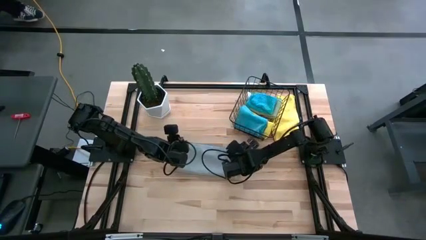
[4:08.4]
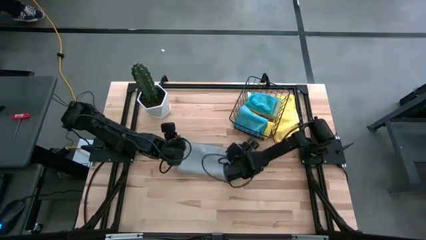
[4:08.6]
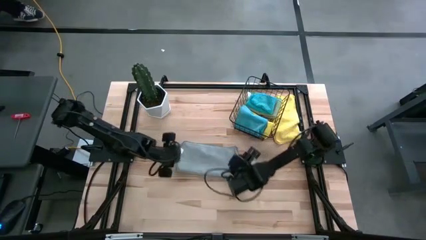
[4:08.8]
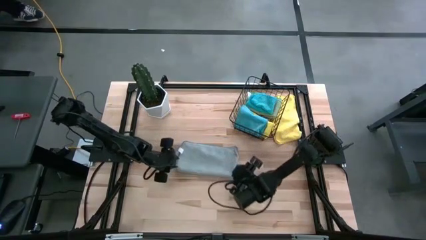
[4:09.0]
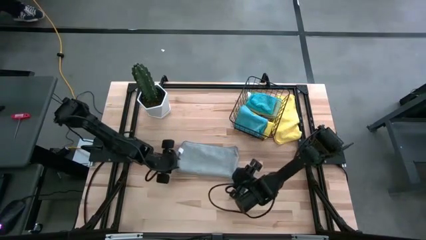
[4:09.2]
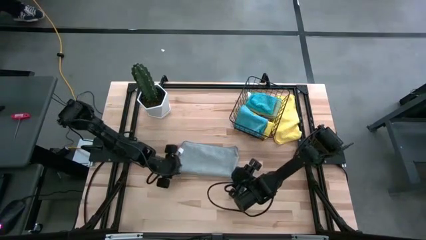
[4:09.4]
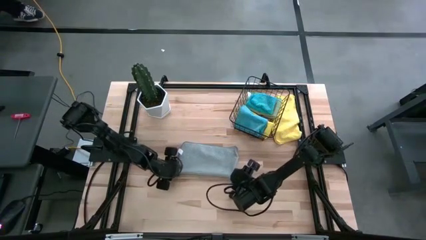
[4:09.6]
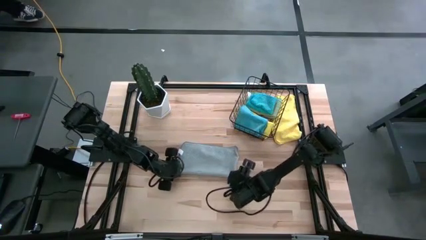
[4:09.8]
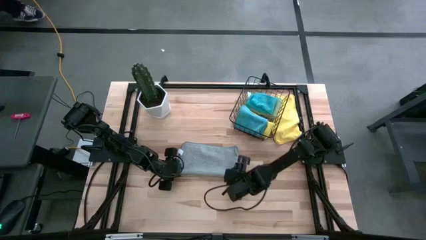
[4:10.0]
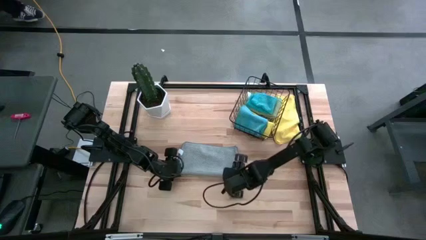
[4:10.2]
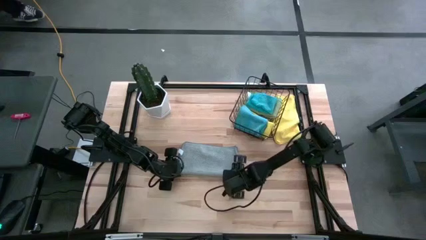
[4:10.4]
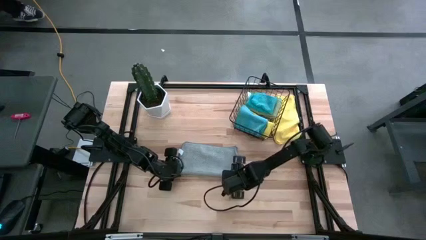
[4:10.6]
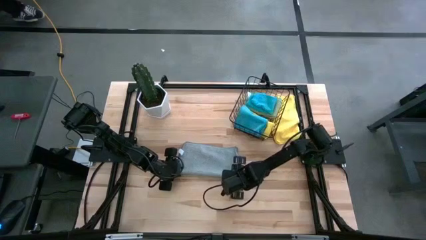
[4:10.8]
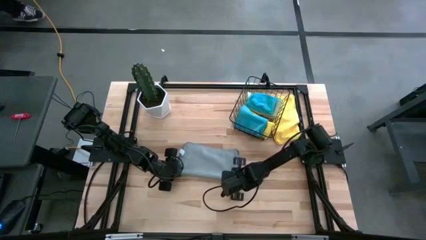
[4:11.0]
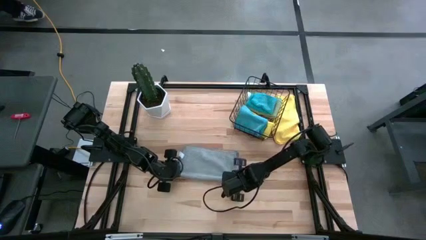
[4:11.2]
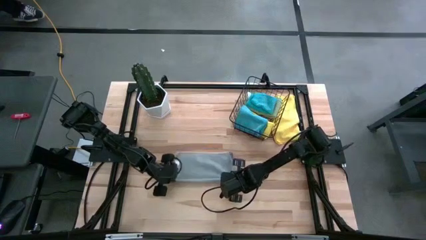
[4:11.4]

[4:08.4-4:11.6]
Task: Fold microfiber towels
Fold the gray microfiber towel

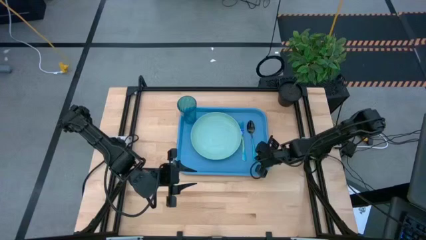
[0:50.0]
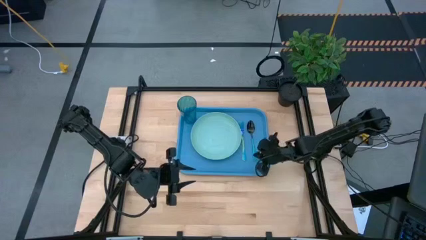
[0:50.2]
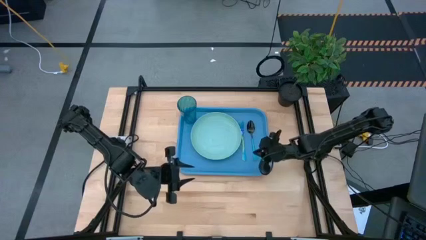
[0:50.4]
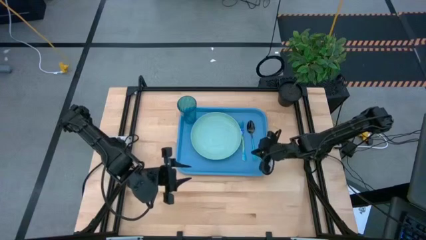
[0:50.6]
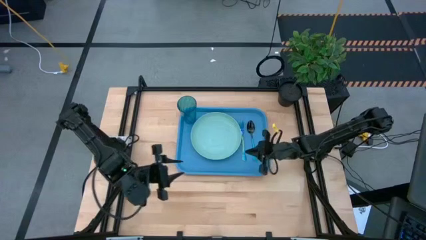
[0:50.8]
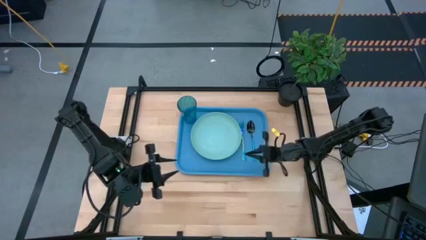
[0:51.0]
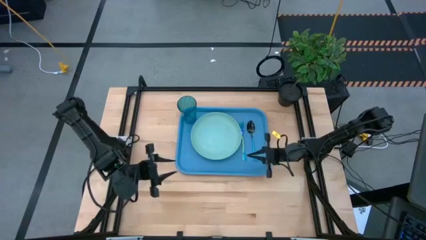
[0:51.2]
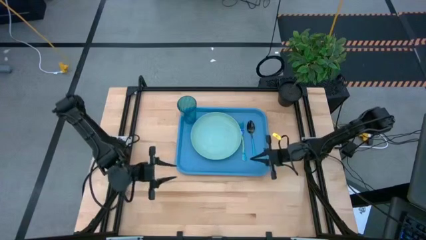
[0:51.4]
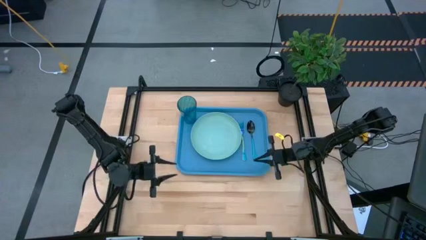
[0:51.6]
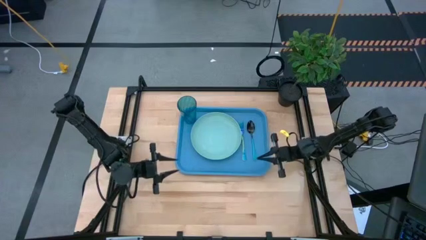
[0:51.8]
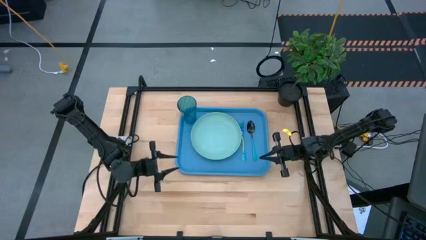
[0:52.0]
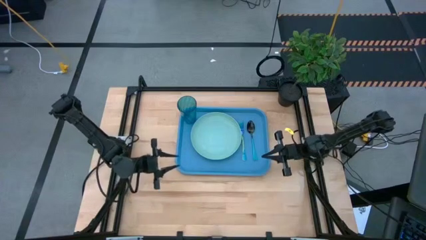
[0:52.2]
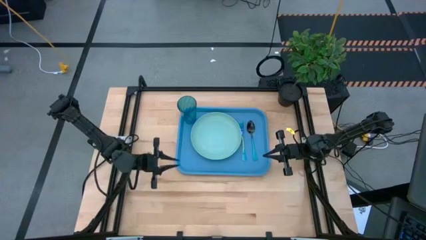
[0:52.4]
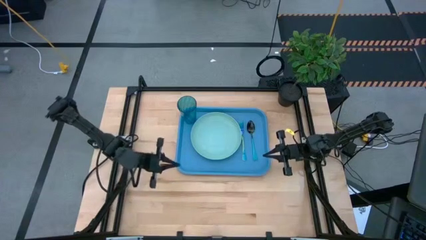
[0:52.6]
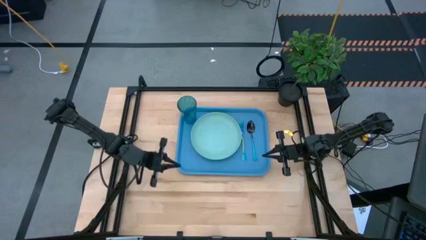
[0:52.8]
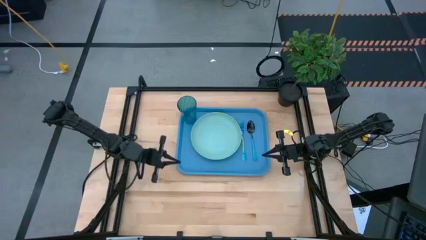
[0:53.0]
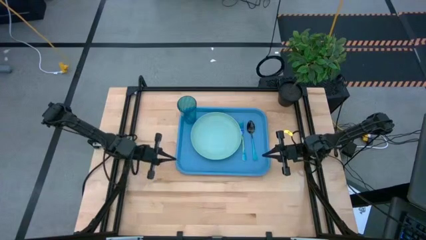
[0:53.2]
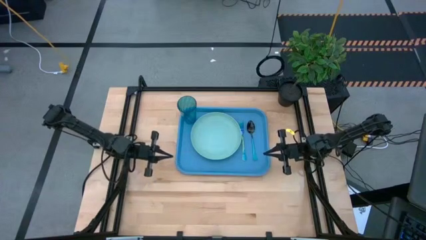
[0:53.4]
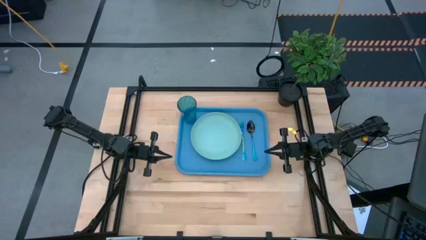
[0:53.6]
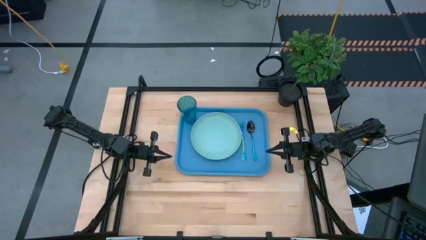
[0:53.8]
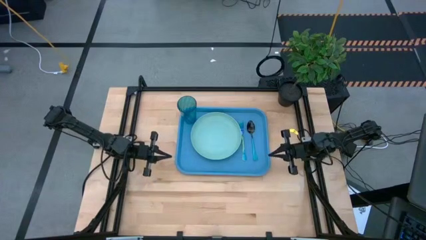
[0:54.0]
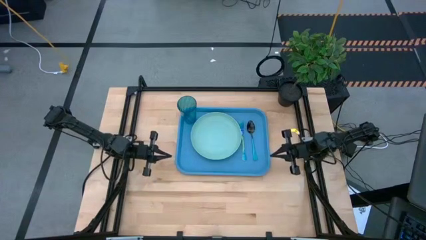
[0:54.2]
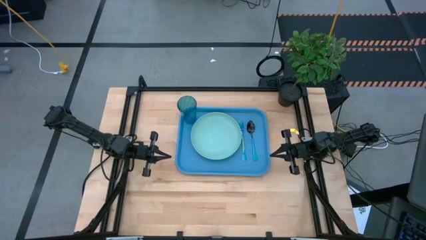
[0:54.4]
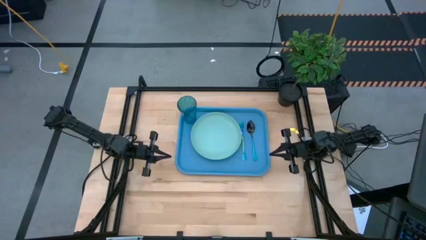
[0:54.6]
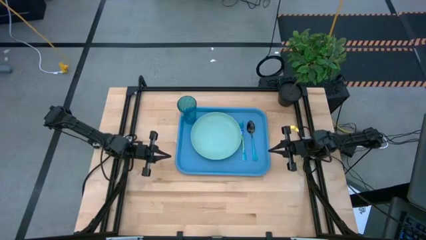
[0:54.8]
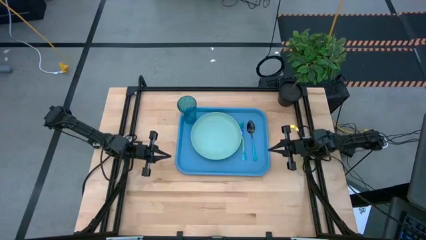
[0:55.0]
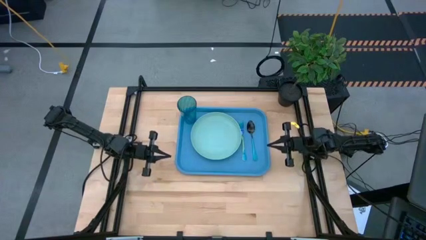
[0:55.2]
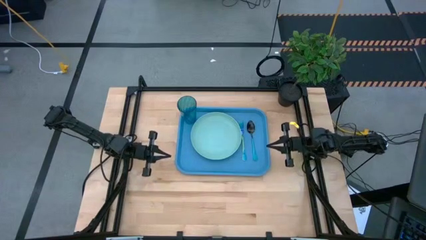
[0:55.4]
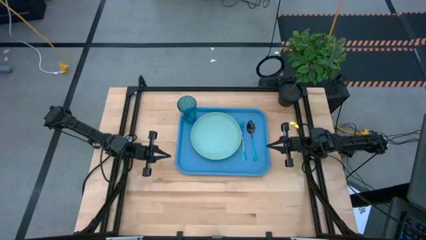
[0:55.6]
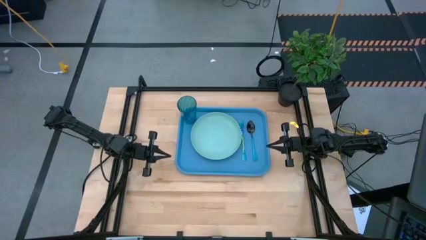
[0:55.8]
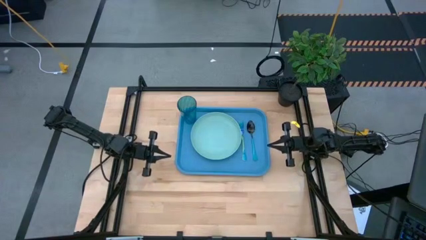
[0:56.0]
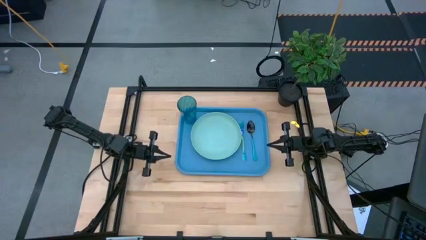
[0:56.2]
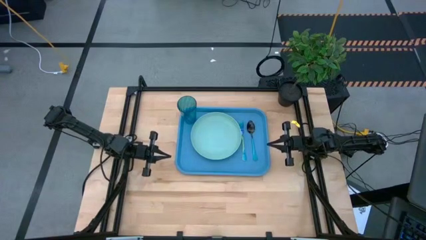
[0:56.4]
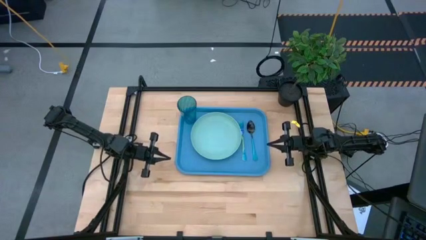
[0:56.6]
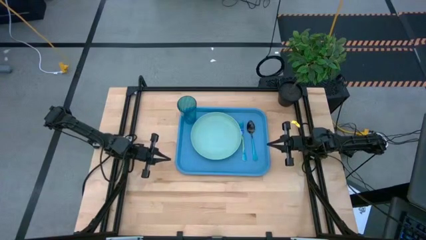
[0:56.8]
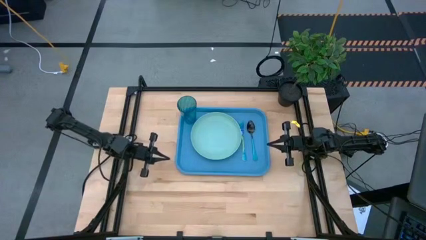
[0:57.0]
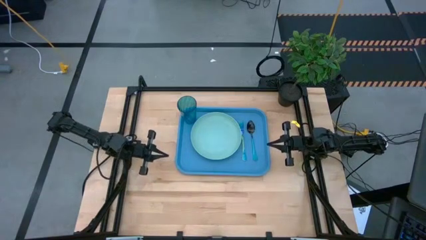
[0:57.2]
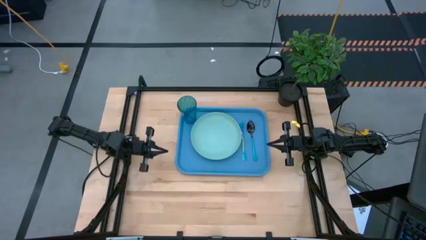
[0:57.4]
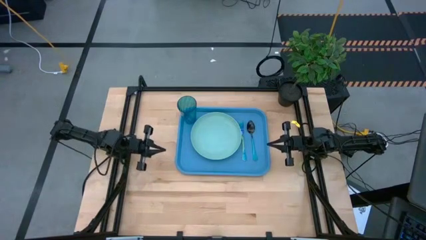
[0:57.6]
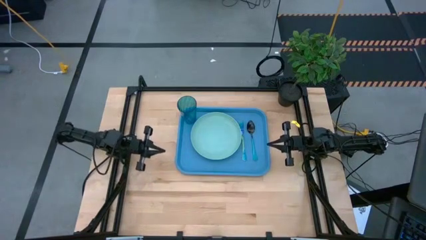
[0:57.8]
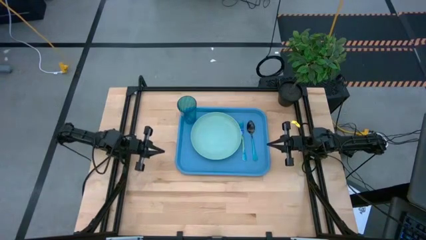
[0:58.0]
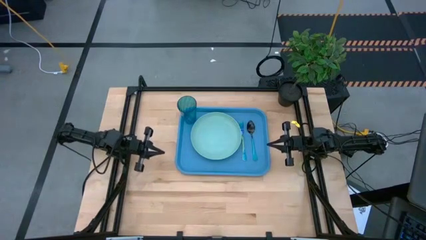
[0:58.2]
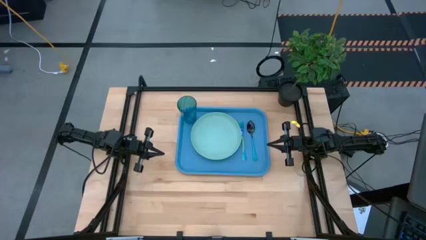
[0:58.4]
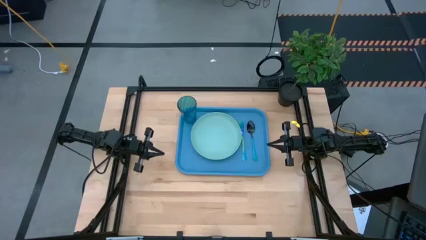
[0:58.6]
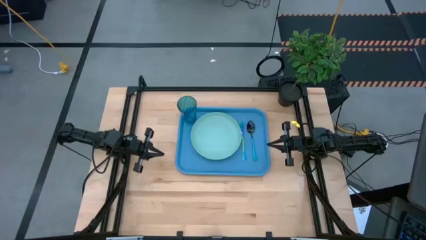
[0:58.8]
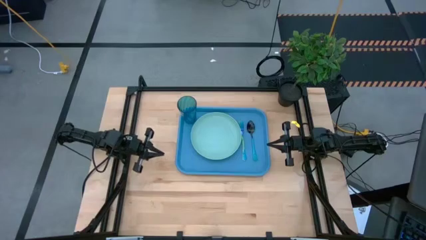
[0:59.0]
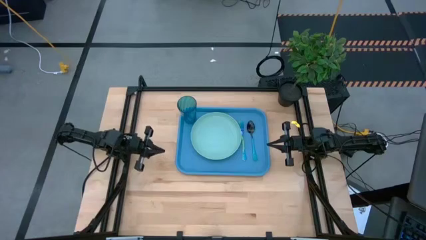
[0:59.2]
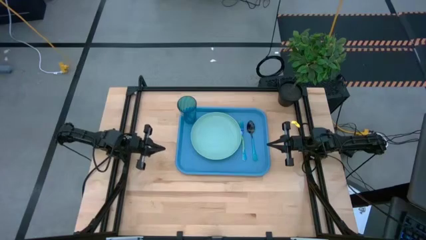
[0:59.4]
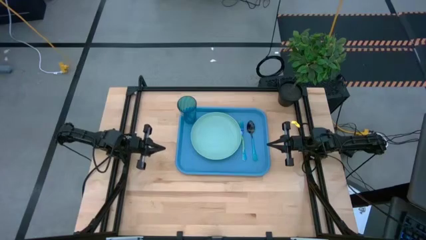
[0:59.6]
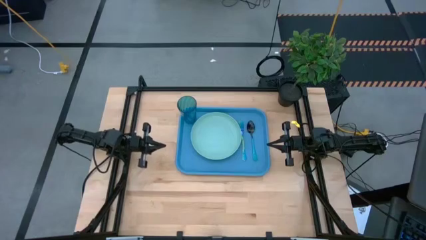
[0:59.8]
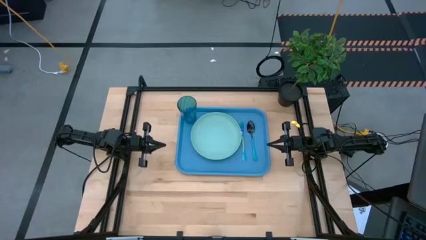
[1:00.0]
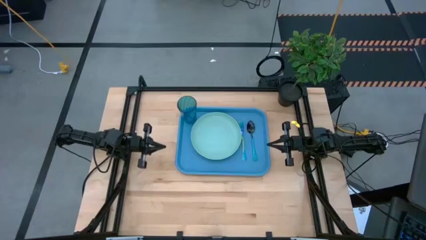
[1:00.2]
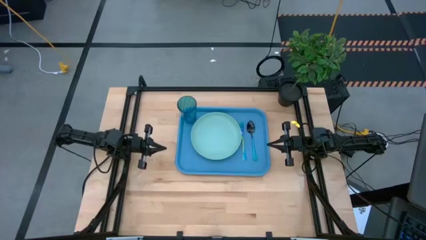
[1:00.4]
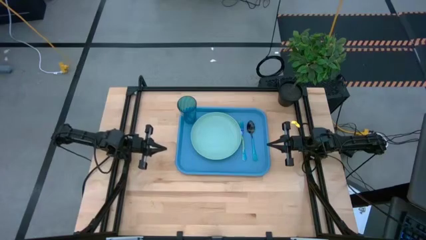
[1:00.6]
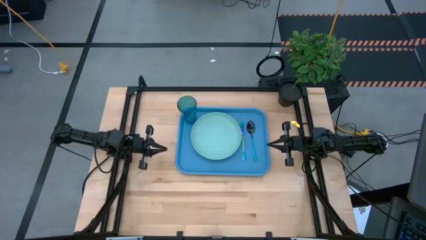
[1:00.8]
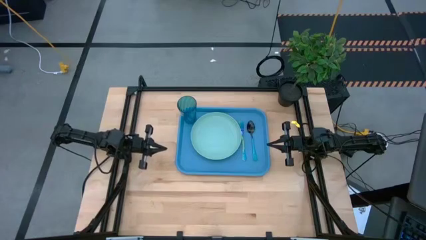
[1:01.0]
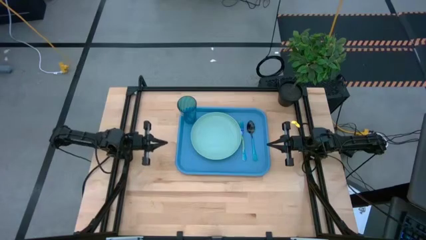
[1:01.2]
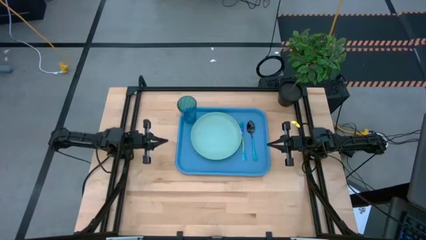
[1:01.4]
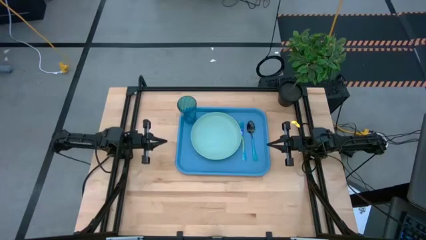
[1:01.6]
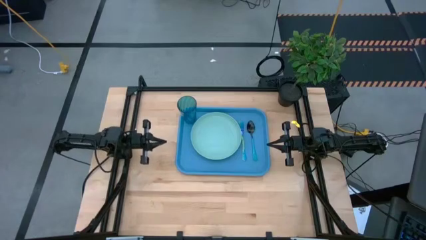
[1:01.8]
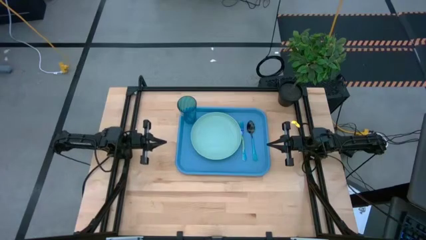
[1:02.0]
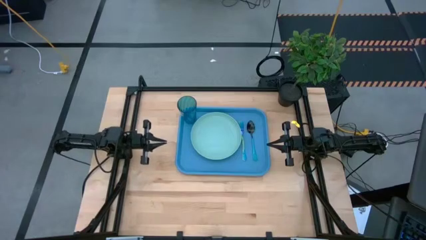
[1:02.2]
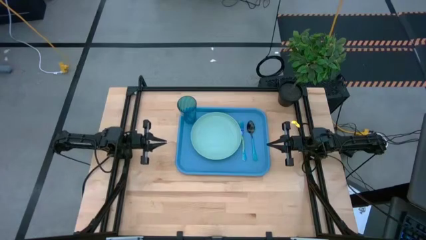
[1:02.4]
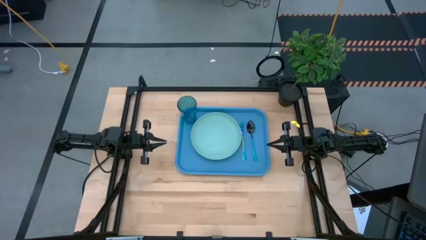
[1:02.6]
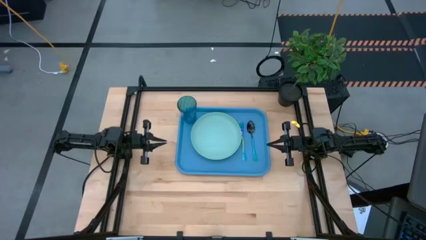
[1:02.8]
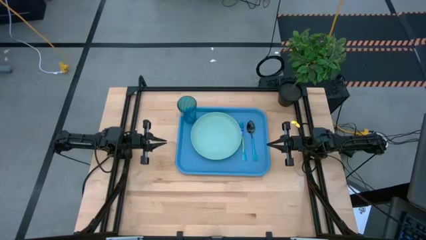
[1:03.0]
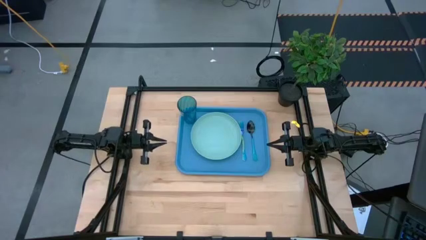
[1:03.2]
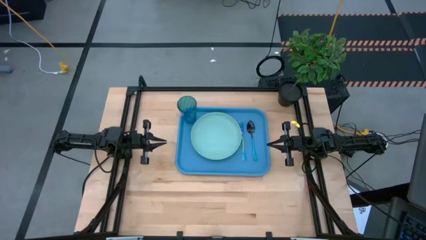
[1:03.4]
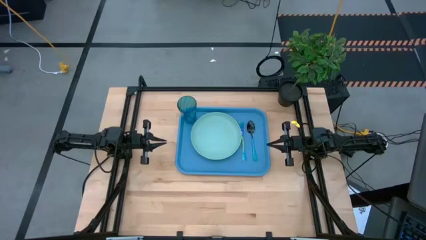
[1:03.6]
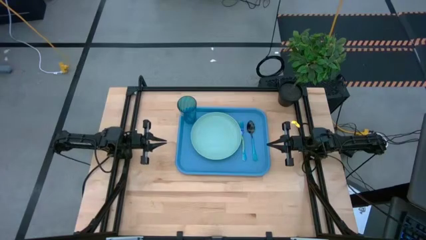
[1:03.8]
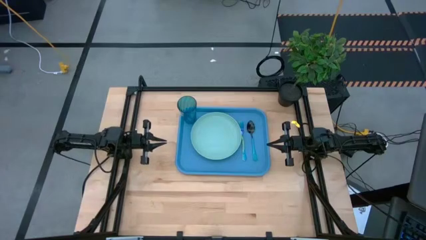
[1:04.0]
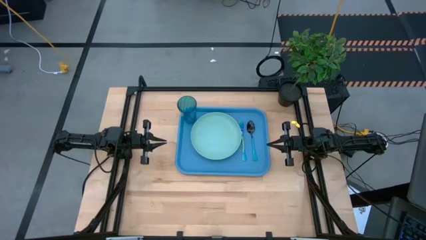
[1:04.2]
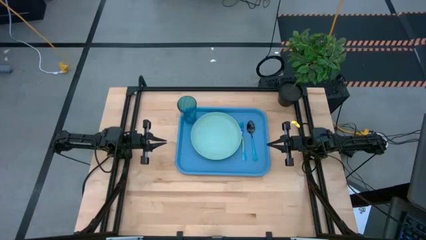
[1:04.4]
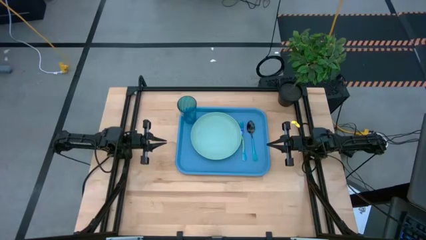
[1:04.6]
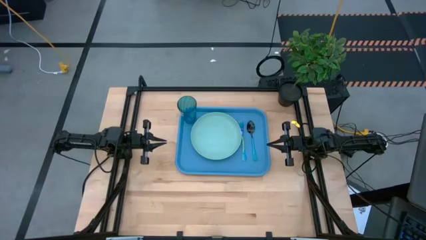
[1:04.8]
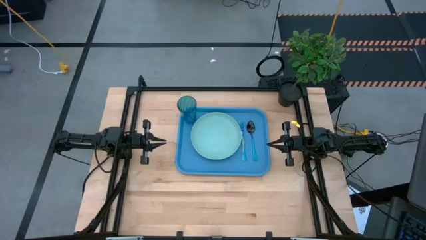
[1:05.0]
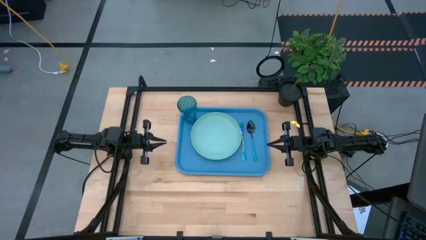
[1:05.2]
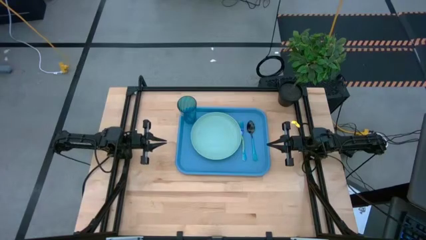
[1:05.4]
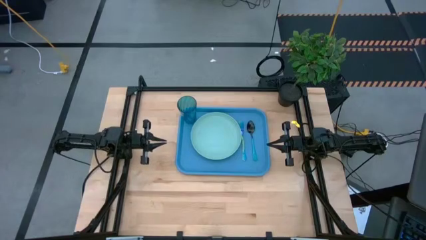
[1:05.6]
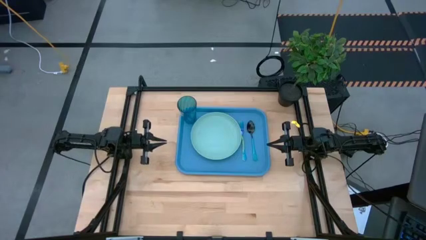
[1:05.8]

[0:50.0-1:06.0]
Task: Pick and place plate/cup/fork/spoon on tray
Return to Home Position
